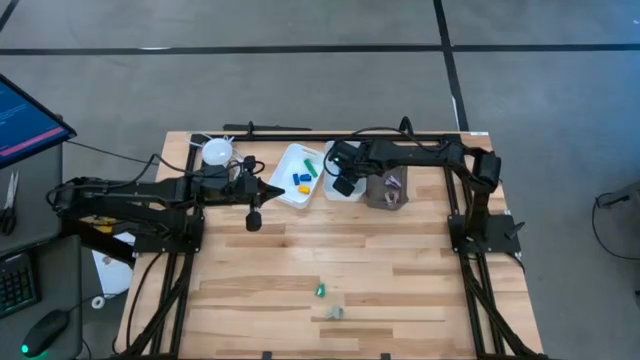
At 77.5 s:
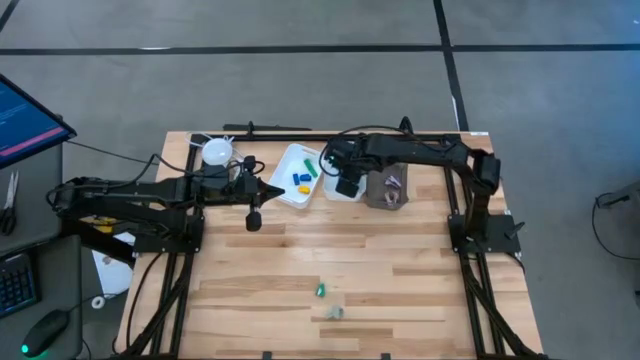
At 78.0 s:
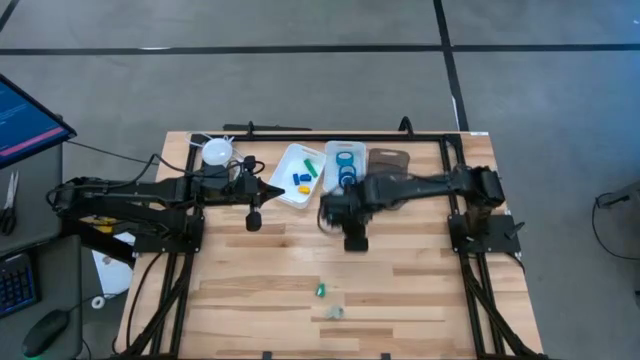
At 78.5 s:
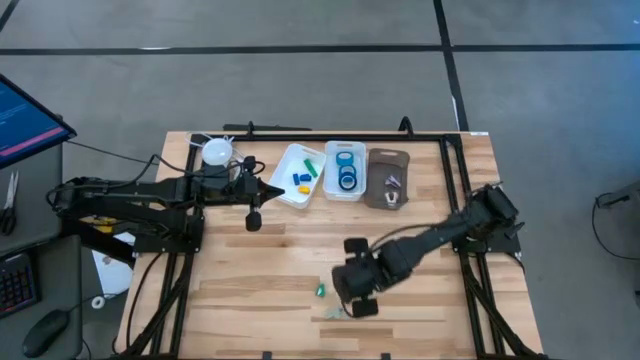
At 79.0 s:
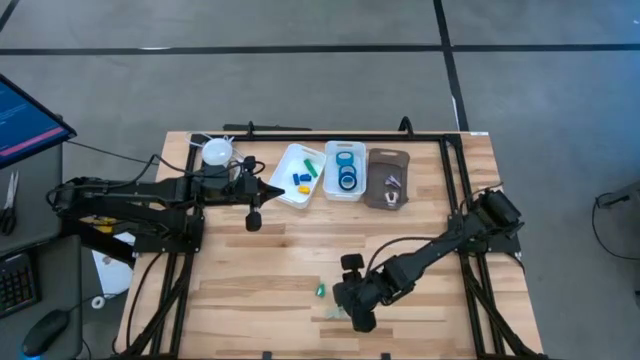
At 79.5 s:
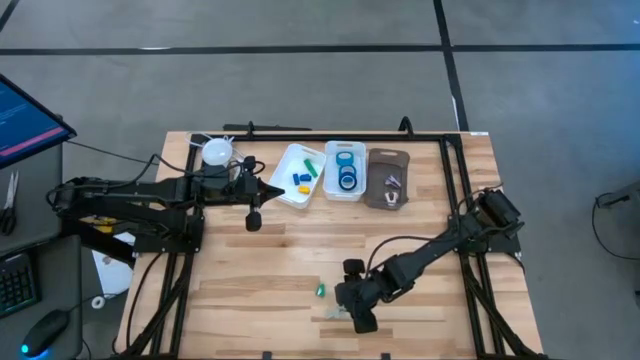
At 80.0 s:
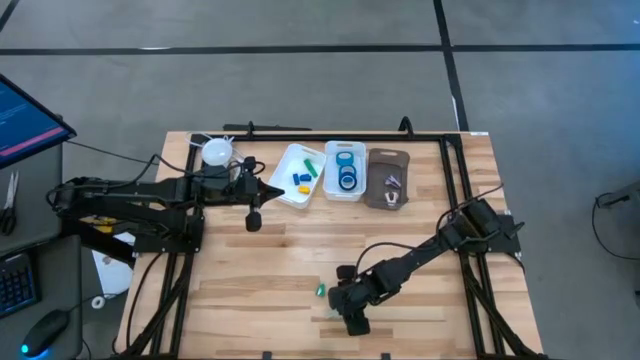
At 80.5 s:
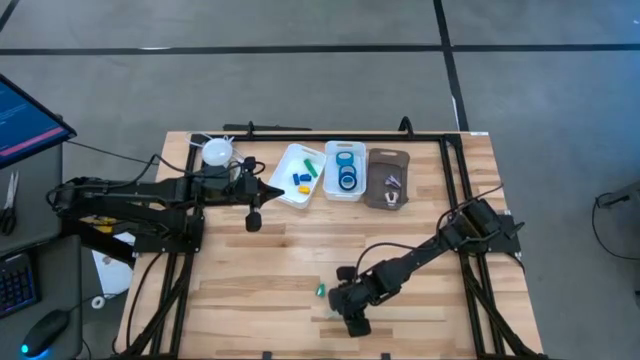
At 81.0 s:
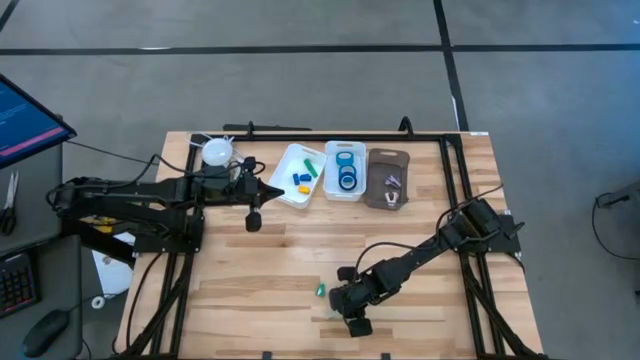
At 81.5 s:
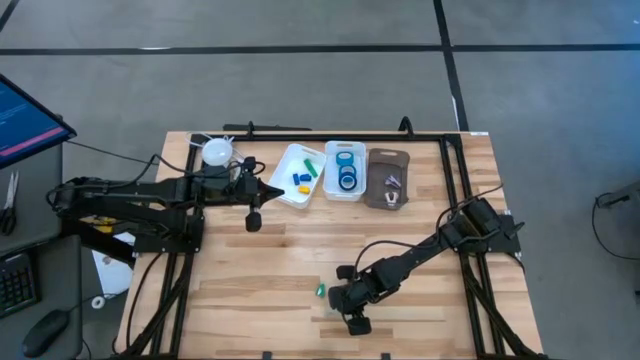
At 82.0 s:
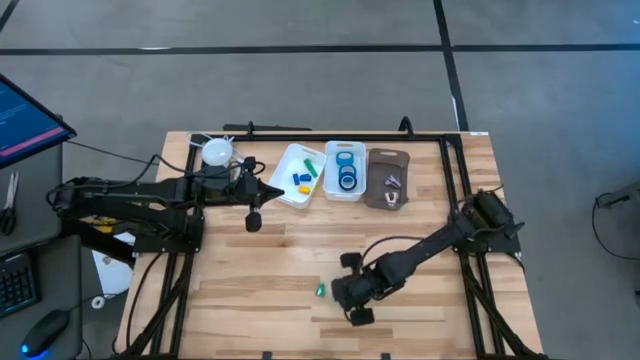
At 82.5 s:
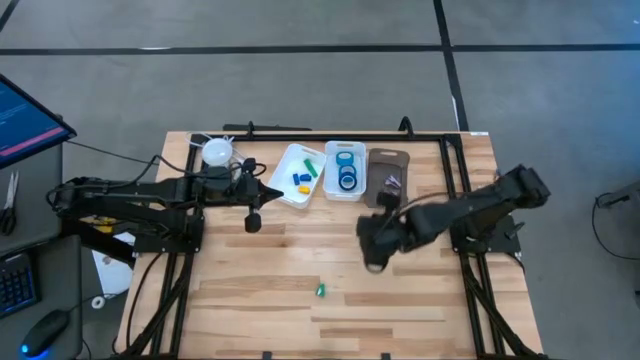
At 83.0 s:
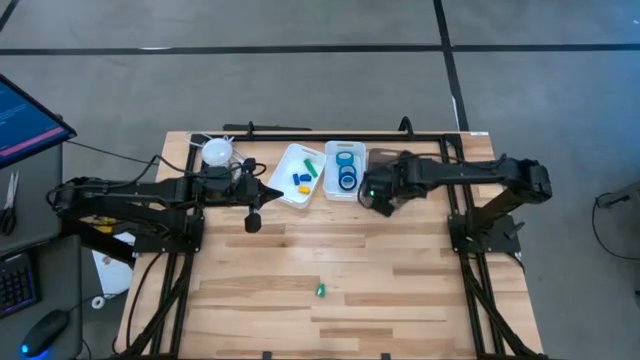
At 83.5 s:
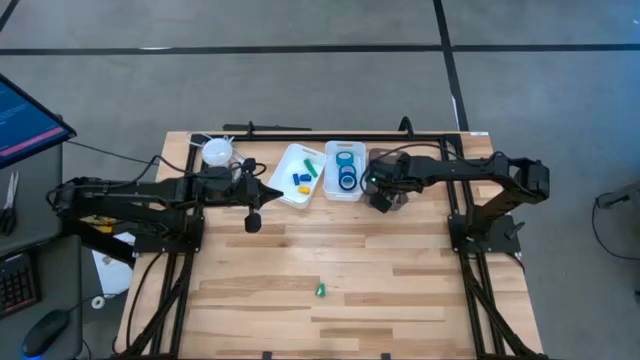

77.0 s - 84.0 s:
Task: Pick and place Stapler, Stapler remover, tape
Put the gray staple remover into the black bin

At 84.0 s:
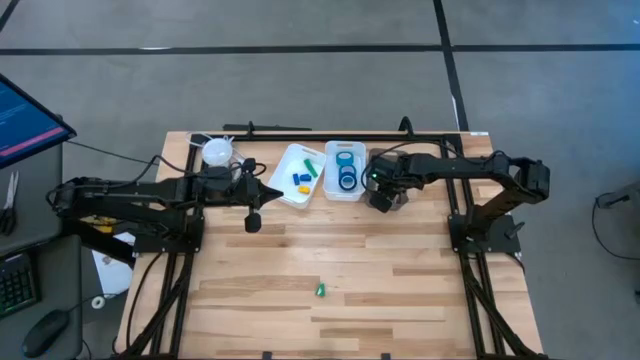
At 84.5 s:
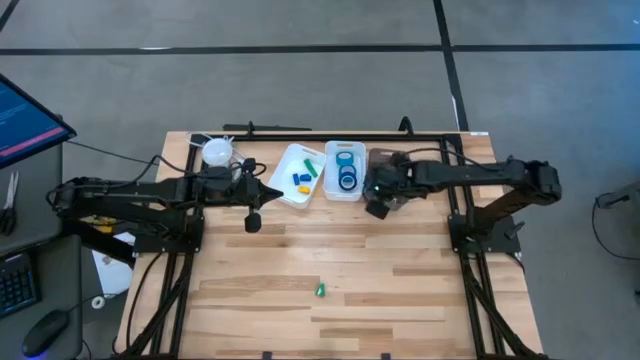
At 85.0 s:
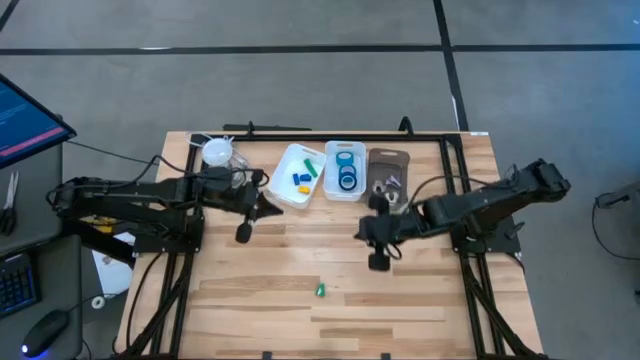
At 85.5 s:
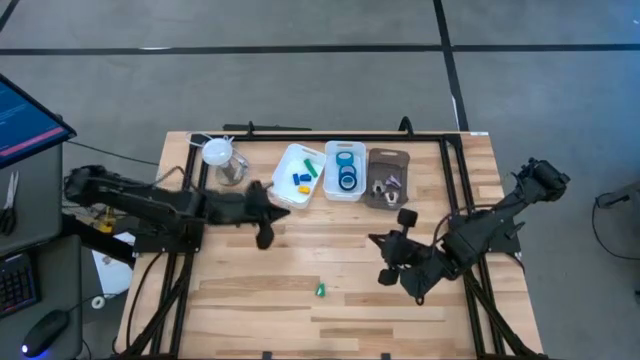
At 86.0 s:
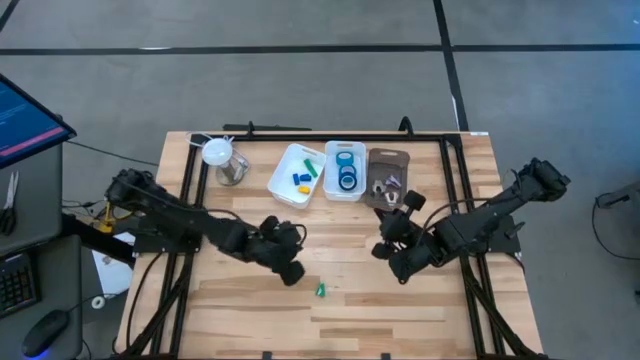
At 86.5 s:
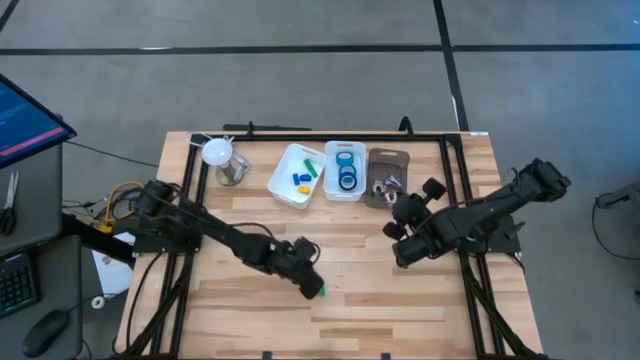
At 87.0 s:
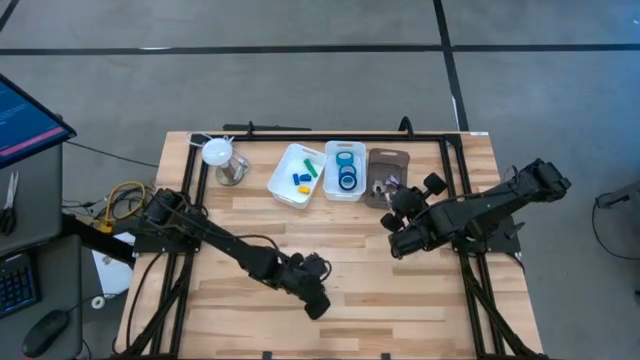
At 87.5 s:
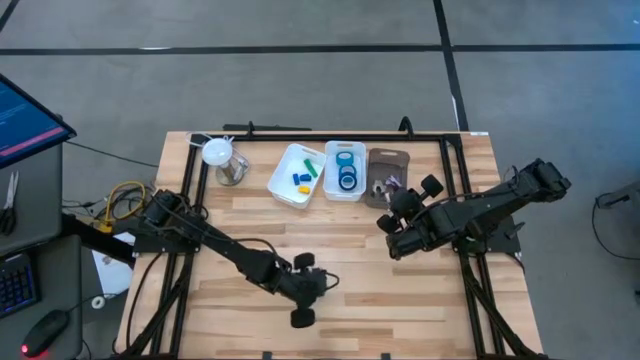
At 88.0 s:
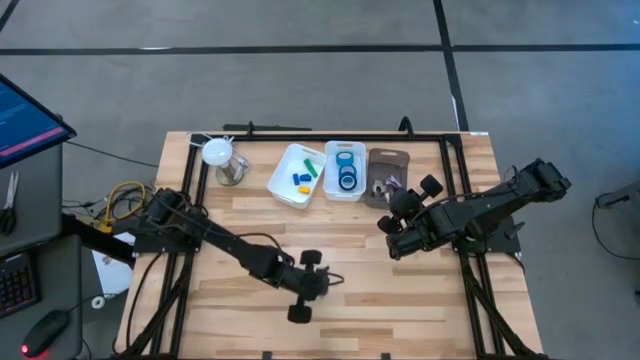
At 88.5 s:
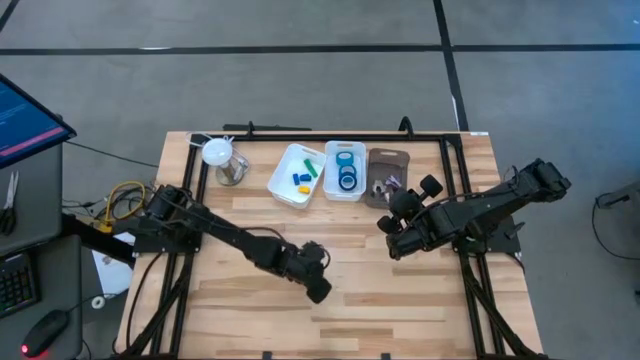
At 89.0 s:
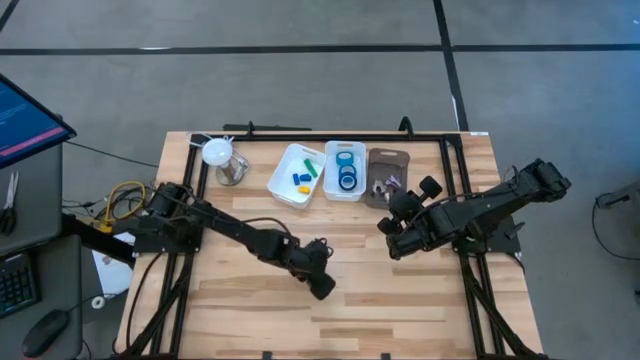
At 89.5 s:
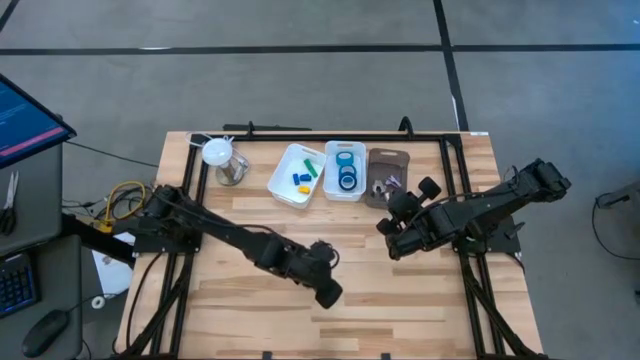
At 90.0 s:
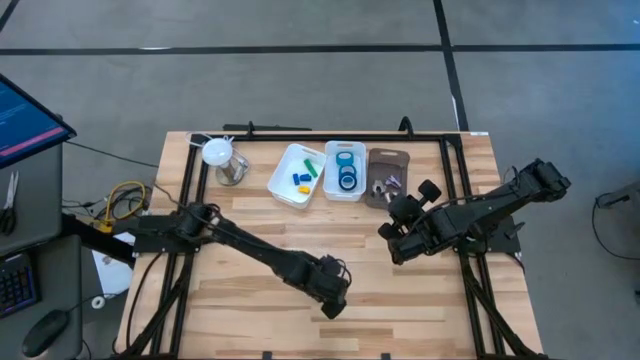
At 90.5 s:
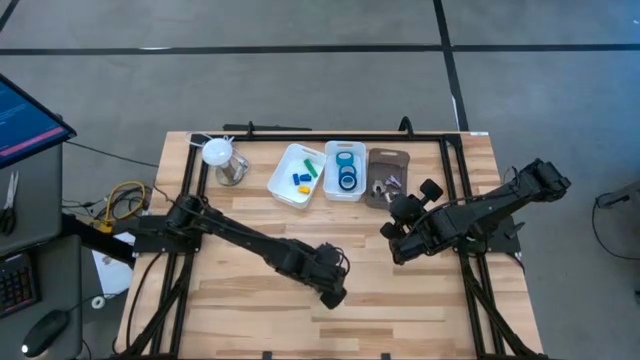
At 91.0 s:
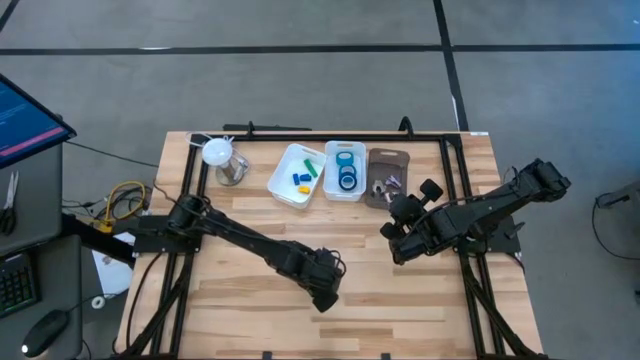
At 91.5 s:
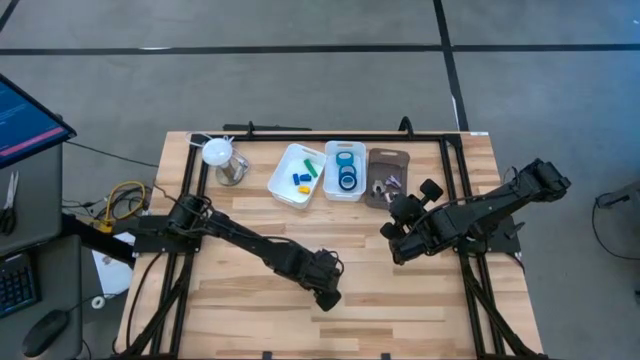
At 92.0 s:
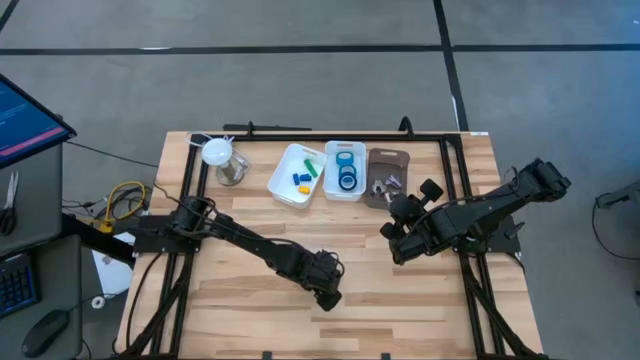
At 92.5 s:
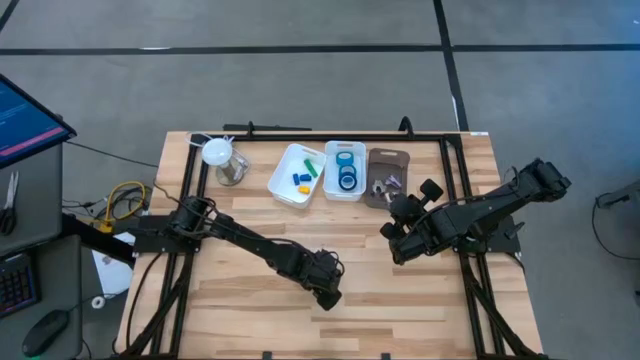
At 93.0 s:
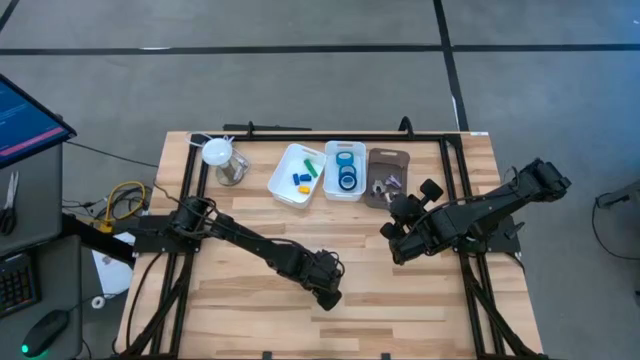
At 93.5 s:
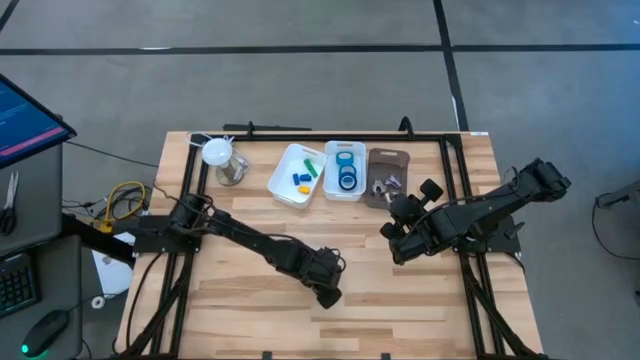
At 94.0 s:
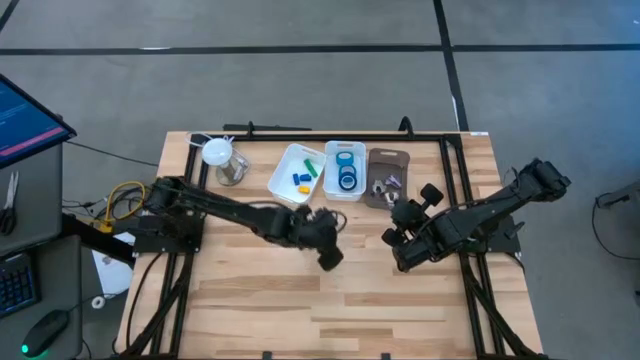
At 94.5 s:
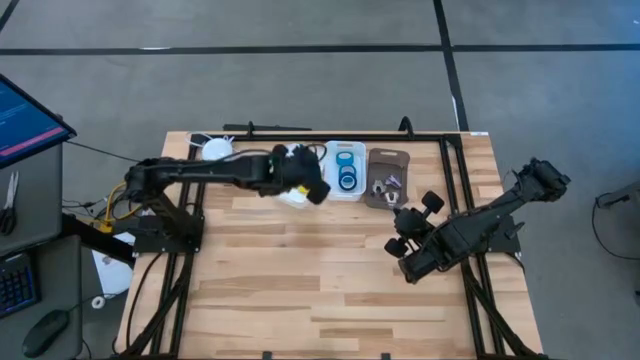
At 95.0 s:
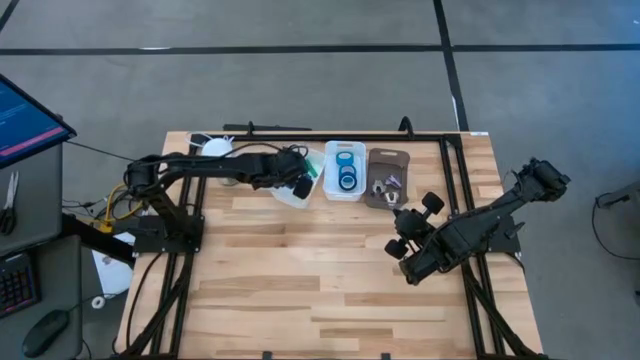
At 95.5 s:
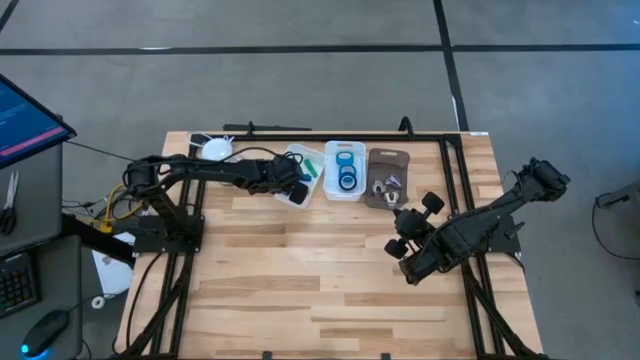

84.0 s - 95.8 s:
Put the green stapler into the left white bin

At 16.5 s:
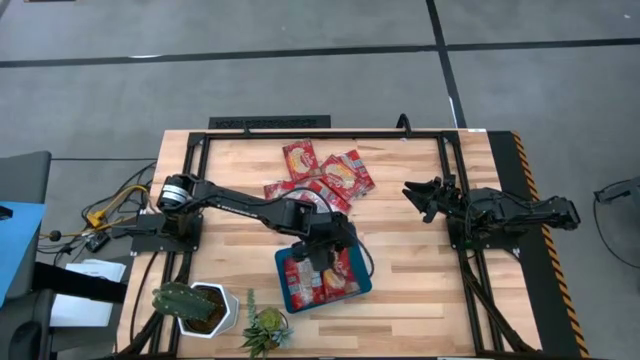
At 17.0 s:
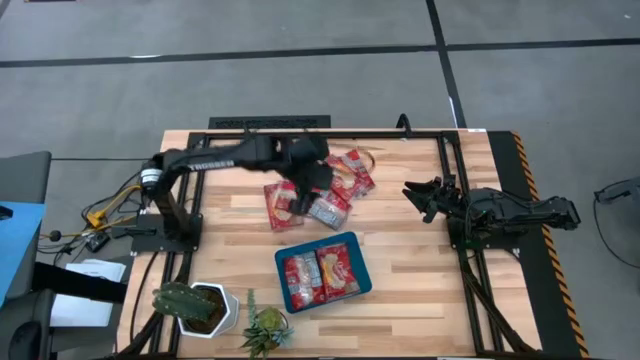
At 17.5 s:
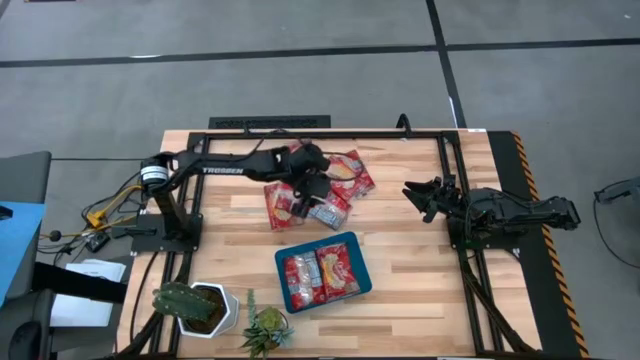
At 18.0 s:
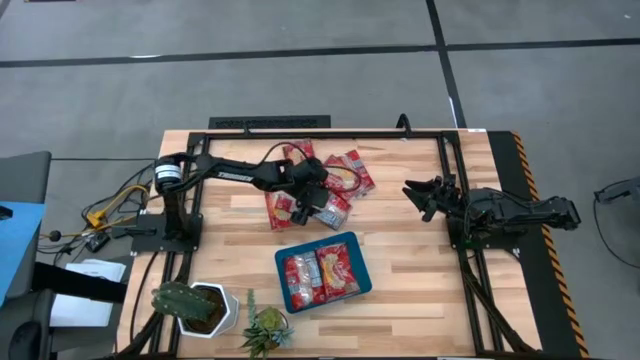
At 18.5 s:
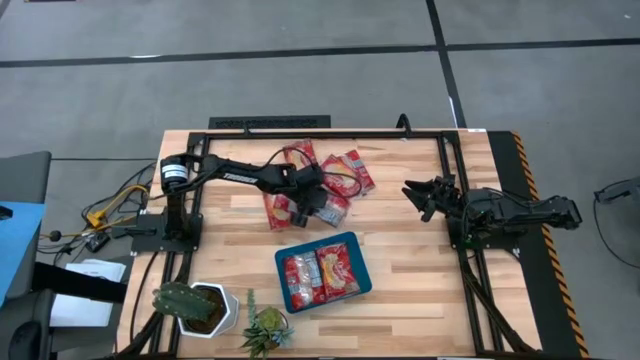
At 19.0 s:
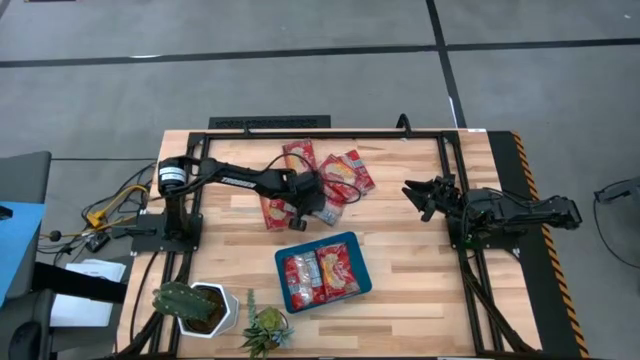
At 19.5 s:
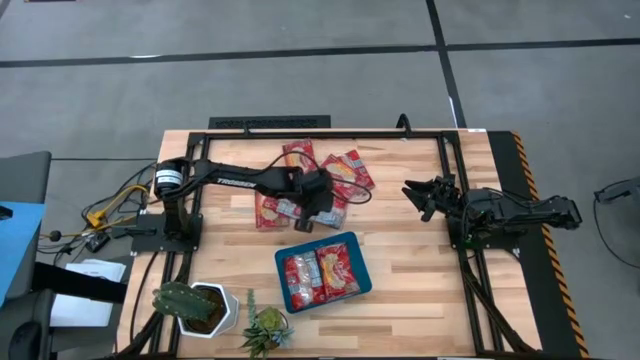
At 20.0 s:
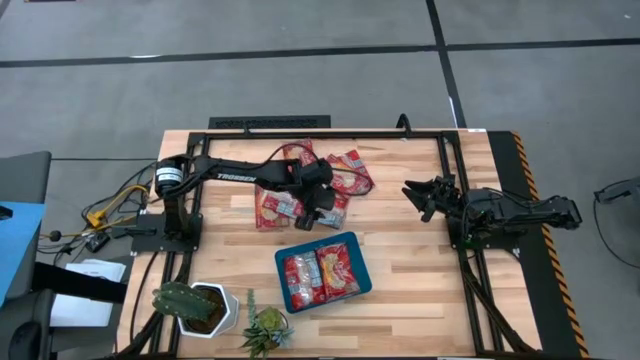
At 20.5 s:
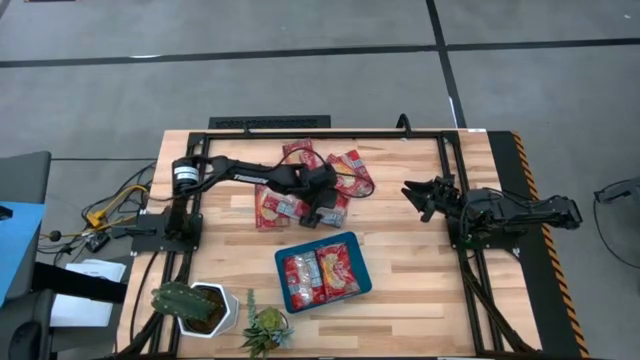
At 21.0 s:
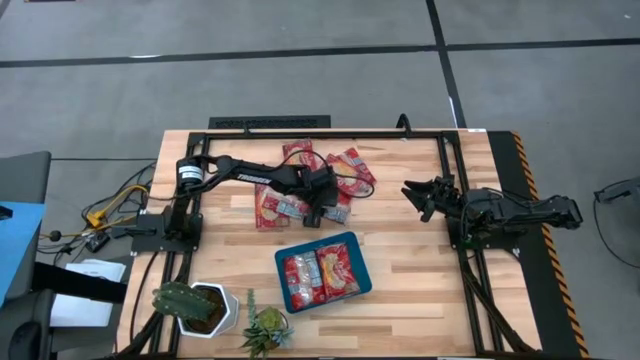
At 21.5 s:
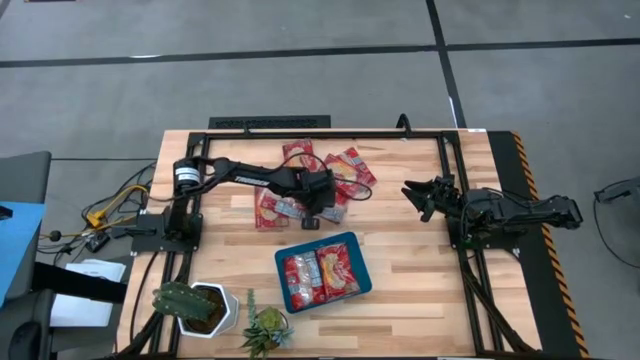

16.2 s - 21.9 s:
Task: Sort popcorn bags into baskets
Put the popcorn bag into the blue bin
